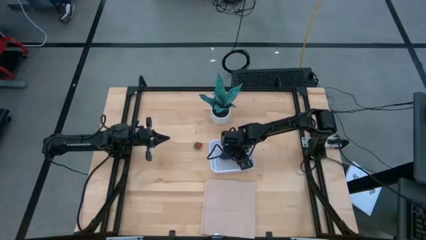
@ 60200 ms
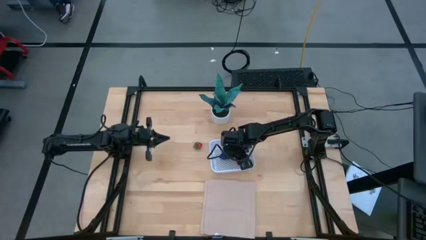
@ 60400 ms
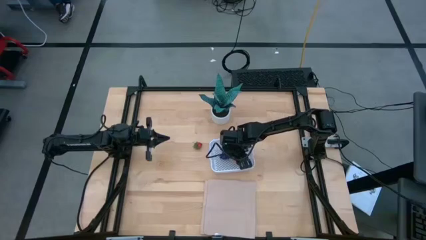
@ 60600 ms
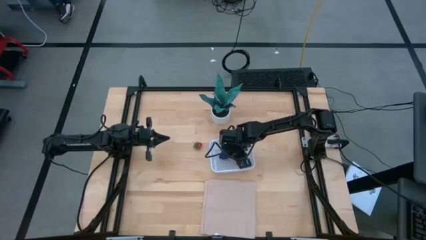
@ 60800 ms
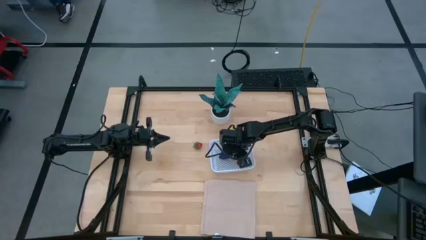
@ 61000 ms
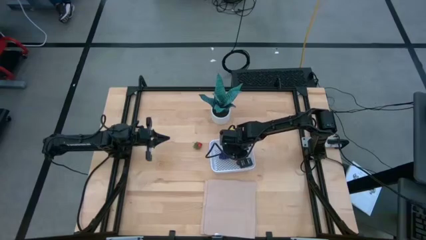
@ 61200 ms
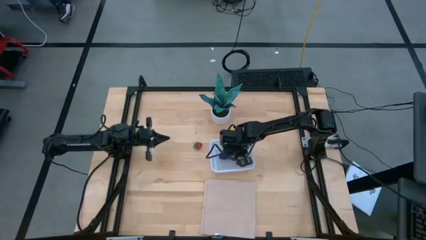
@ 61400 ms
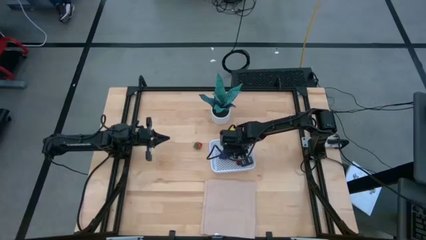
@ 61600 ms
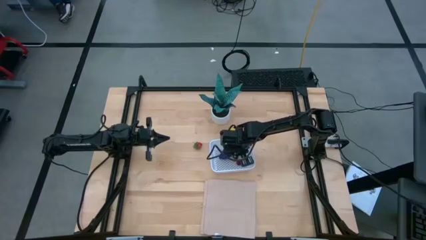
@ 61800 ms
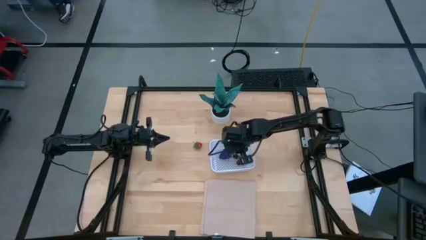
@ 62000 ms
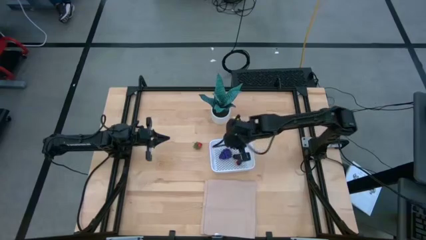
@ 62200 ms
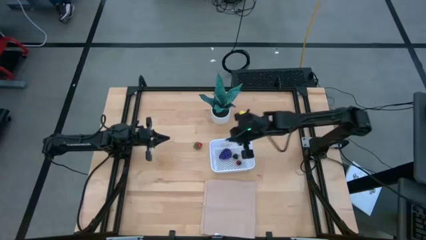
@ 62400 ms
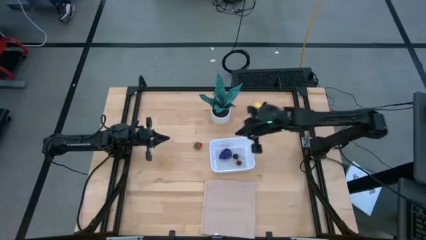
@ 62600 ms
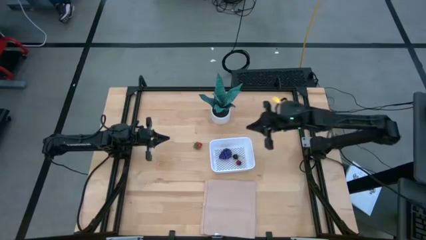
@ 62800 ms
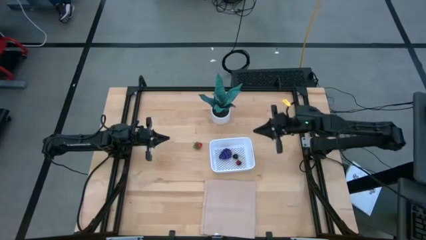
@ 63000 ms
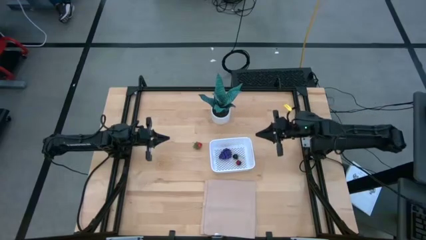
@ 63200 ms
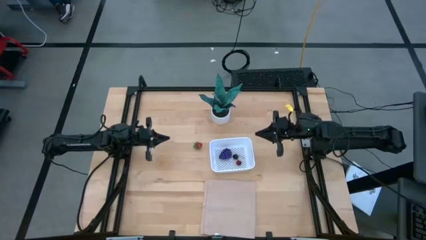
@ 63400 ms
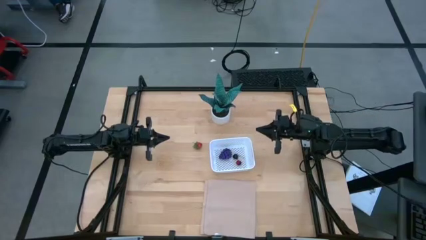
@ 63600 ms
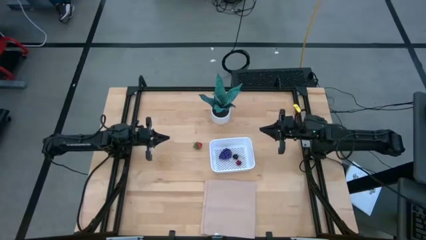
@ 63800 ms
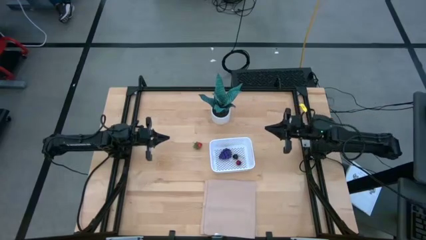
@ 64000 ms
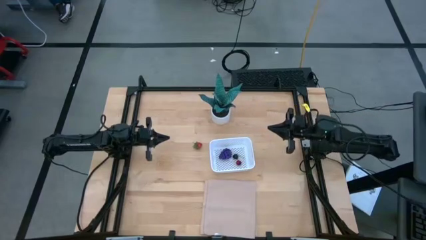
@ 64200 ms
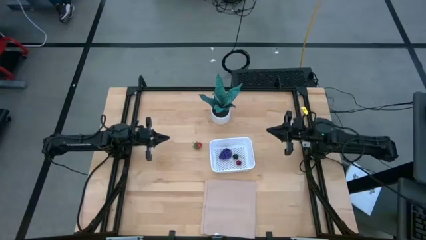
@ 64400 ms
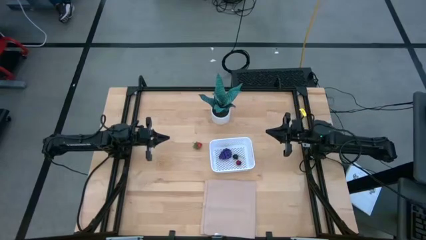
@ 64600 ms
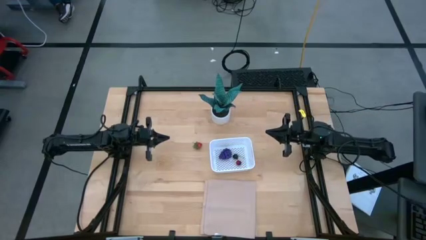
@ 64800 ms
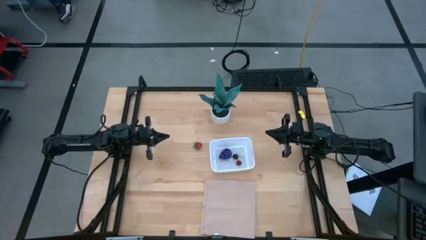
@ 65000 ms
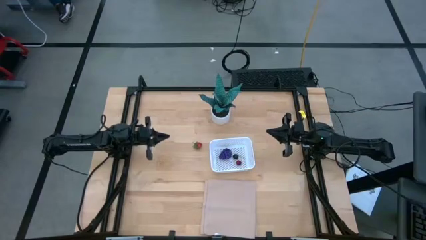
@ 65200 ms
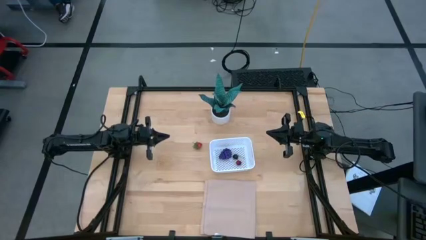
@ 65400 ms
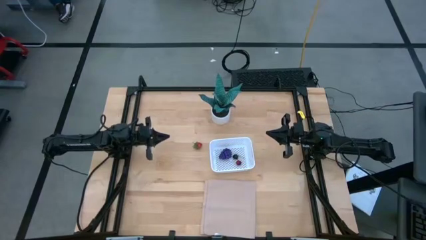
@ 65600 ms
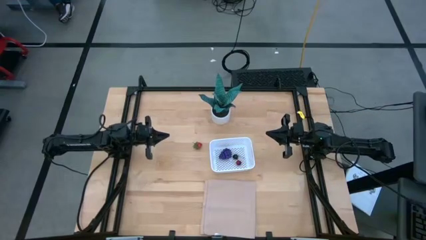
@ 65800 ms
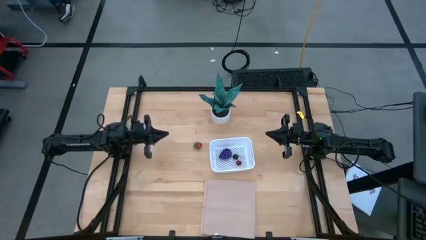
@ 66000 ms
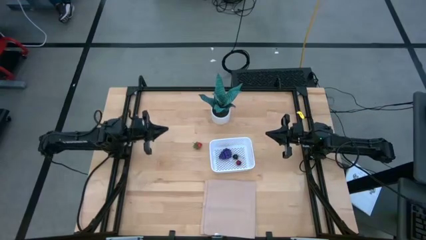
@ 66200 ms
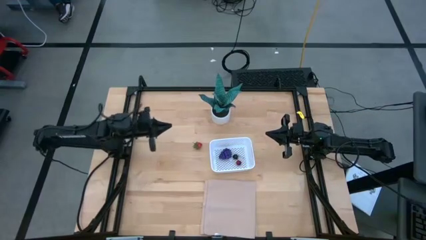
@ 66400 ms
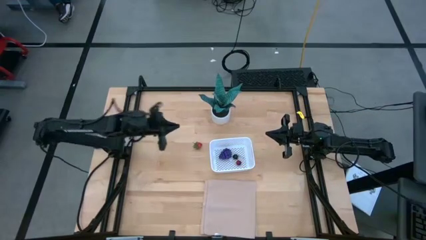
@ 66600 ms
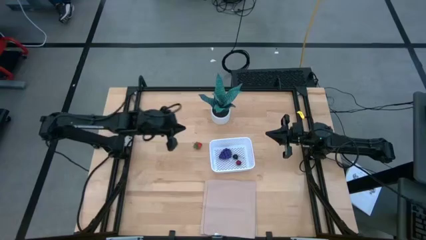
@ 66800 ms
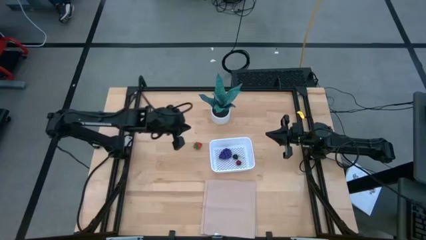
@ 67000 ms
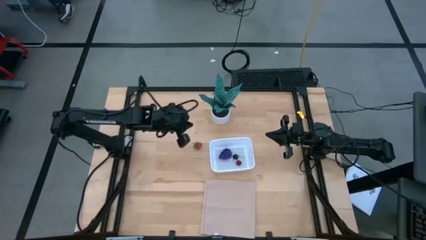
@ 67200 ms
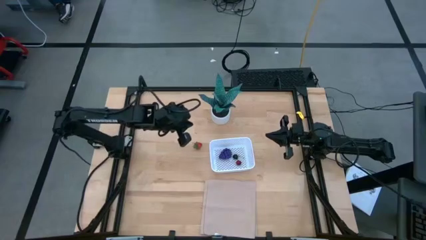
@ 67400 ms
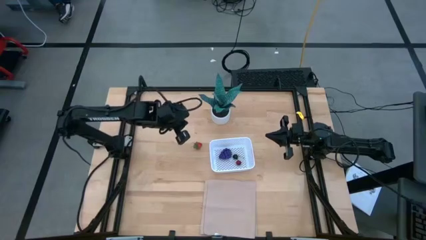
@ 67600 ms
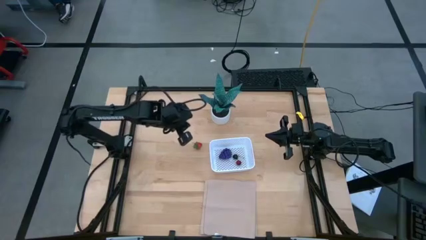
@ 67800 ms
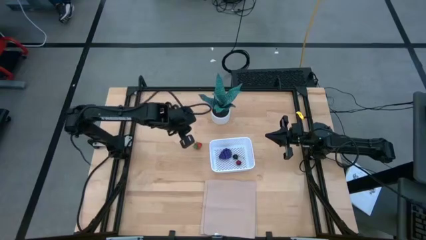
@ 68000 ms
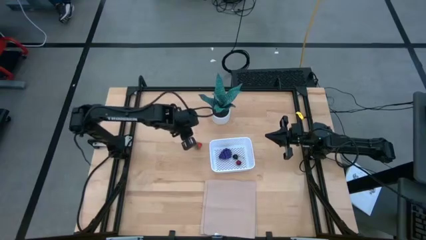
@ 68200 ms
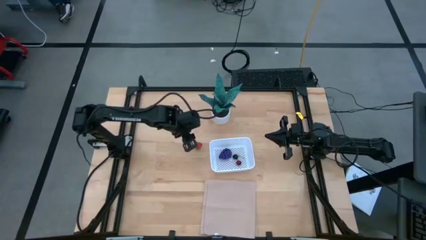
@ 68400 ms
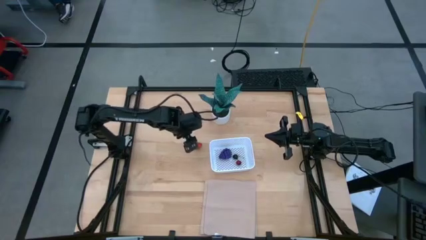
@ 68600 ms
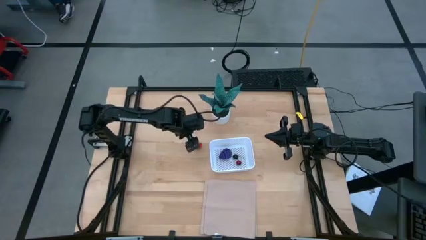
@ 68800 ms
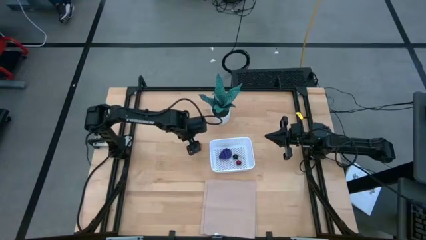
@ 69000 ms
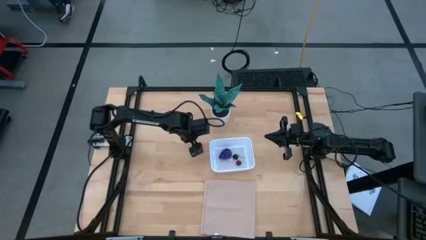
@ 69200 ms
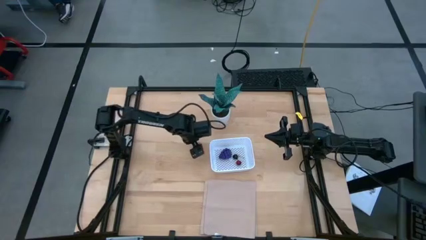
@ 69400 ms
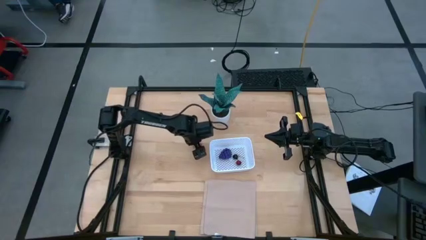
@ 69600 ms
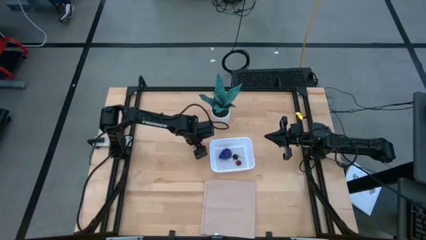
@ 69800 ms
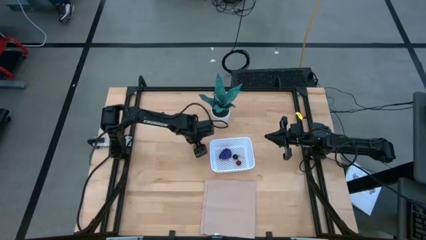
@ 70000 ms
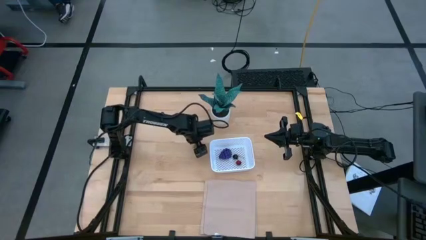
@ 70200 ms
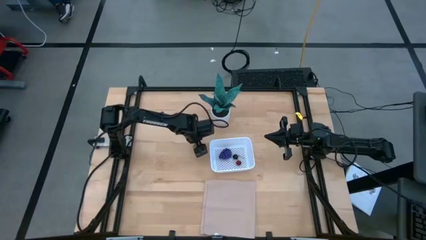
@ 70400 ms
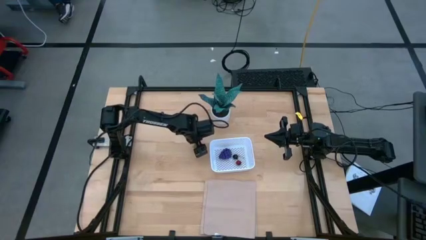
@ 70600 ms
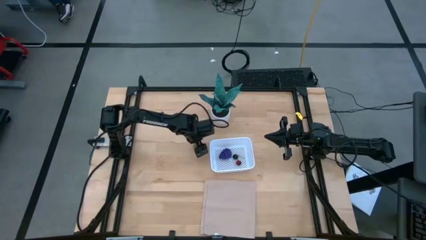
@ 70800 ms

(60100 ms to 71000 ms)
Task: Pick and placing Produce into tupperware
Put the strawberry into the basket
